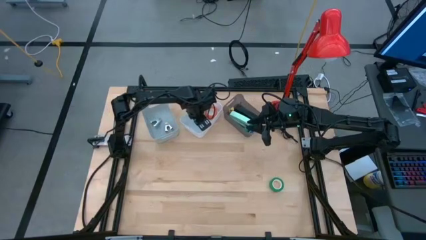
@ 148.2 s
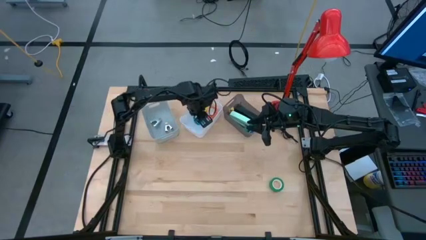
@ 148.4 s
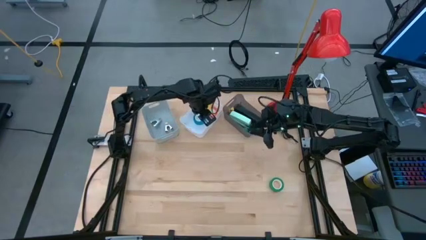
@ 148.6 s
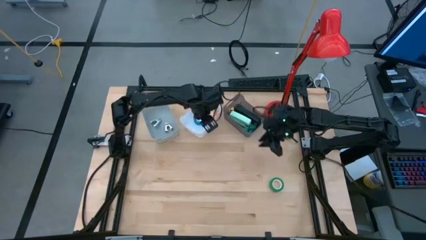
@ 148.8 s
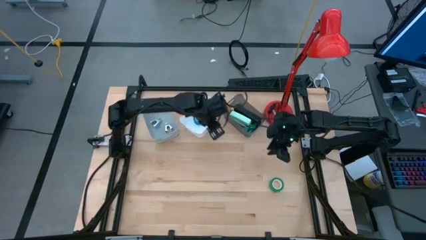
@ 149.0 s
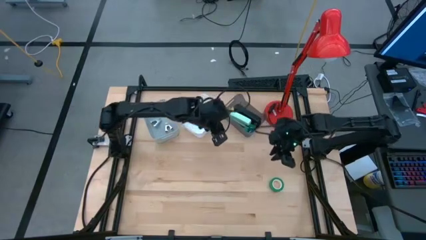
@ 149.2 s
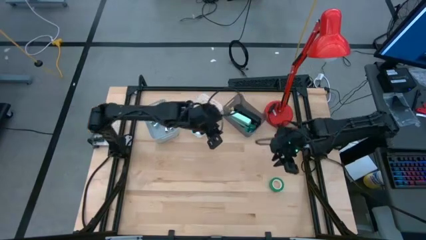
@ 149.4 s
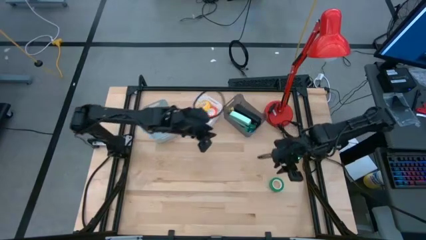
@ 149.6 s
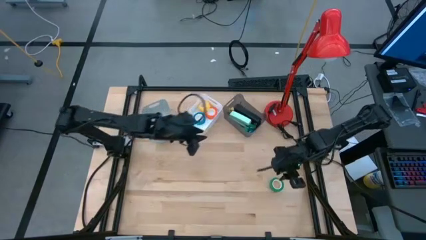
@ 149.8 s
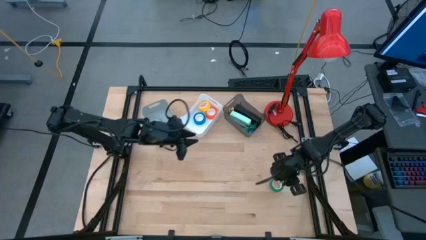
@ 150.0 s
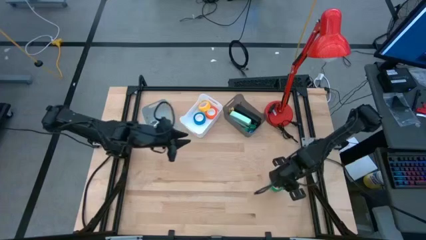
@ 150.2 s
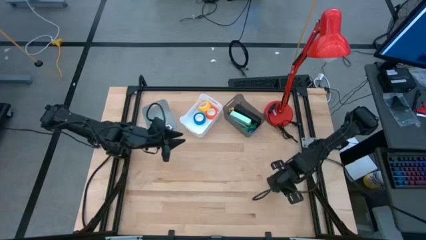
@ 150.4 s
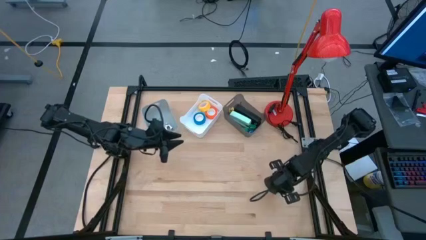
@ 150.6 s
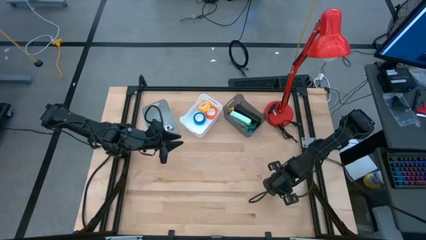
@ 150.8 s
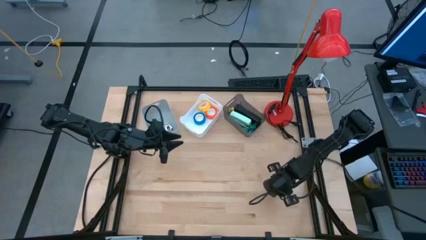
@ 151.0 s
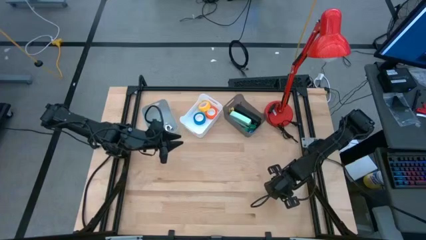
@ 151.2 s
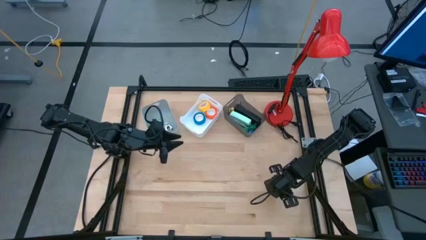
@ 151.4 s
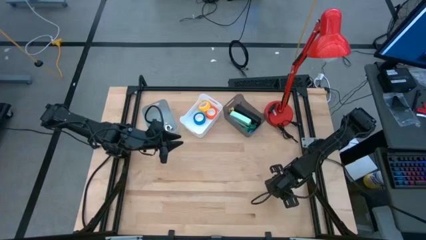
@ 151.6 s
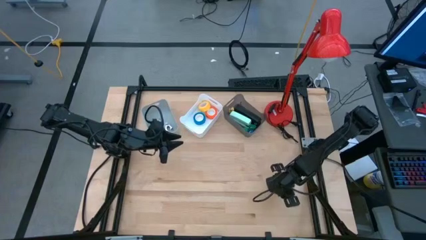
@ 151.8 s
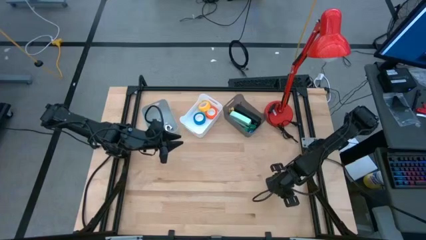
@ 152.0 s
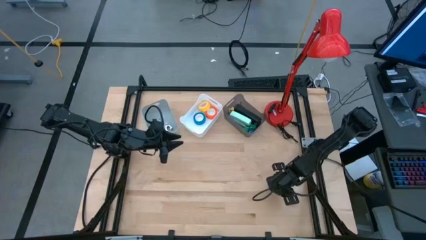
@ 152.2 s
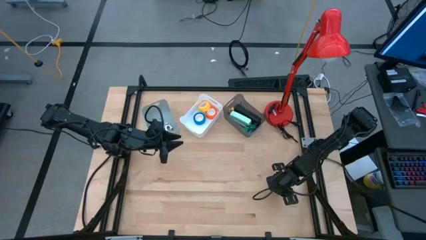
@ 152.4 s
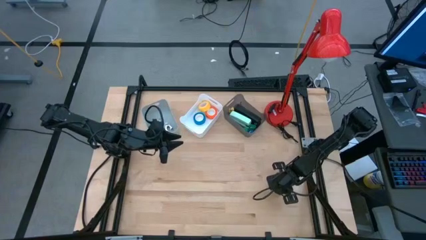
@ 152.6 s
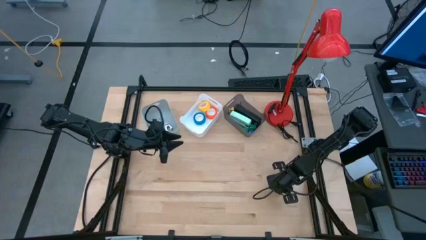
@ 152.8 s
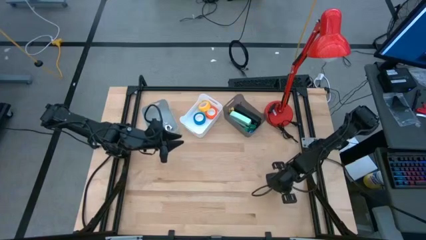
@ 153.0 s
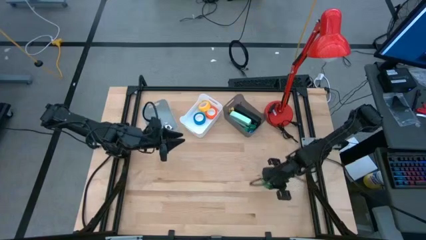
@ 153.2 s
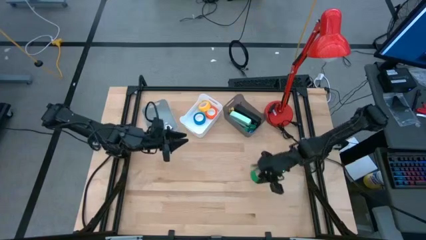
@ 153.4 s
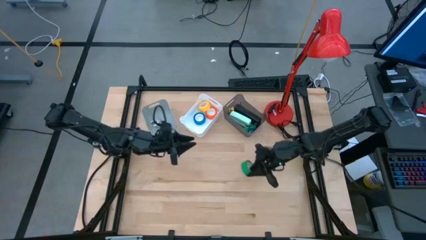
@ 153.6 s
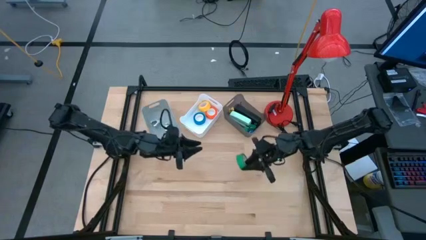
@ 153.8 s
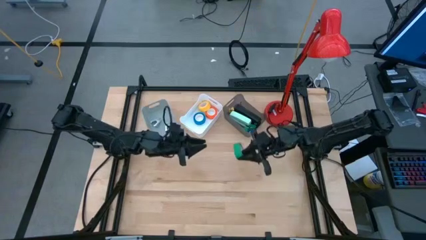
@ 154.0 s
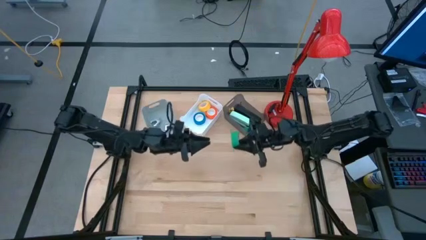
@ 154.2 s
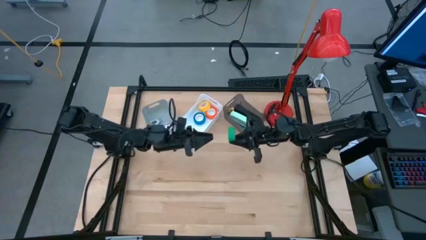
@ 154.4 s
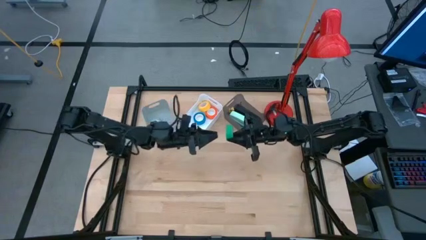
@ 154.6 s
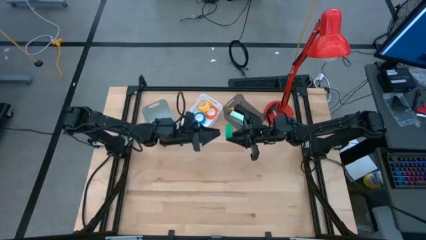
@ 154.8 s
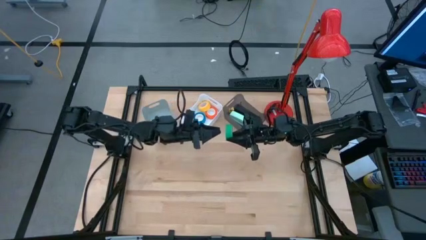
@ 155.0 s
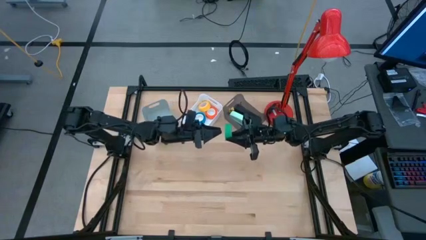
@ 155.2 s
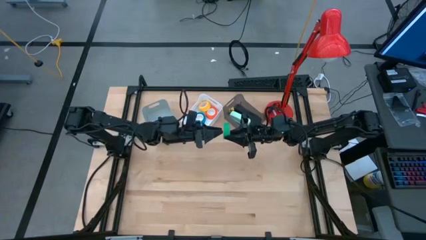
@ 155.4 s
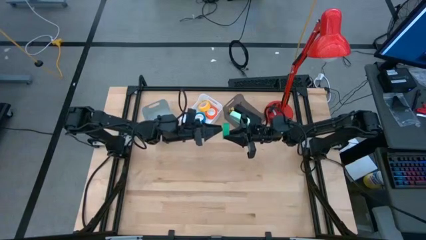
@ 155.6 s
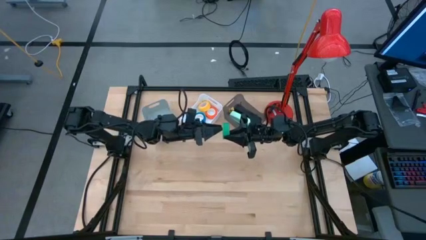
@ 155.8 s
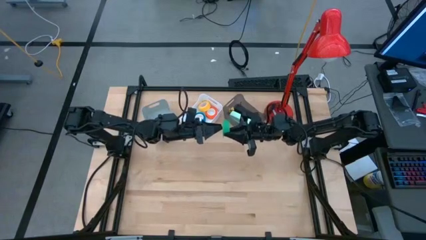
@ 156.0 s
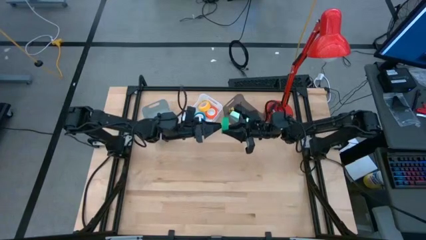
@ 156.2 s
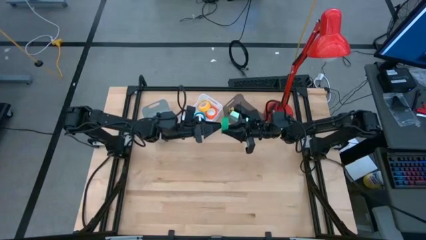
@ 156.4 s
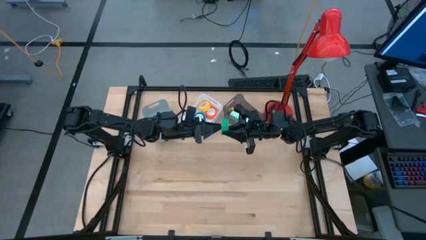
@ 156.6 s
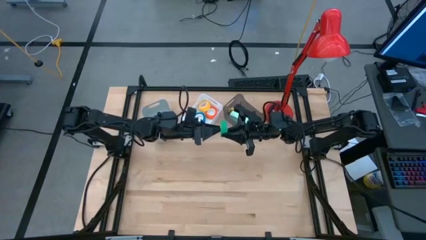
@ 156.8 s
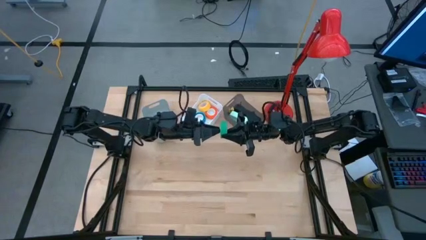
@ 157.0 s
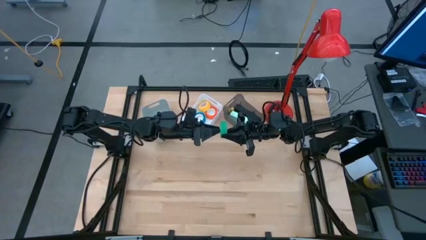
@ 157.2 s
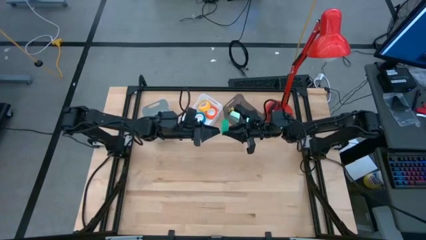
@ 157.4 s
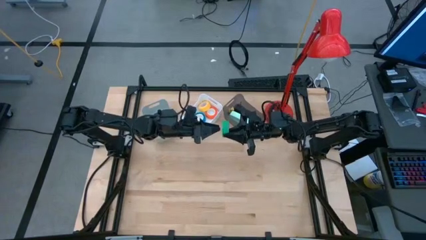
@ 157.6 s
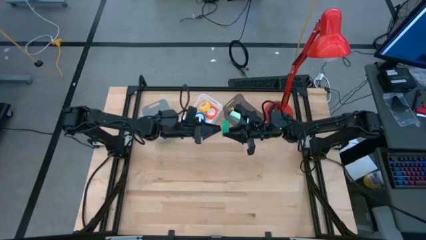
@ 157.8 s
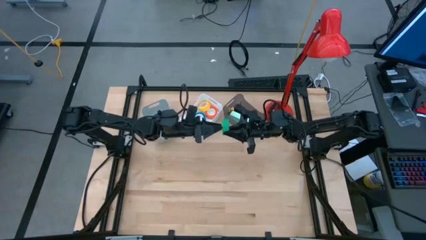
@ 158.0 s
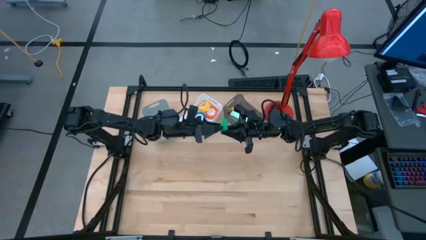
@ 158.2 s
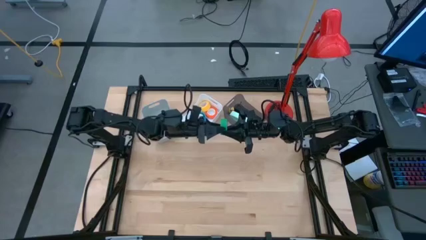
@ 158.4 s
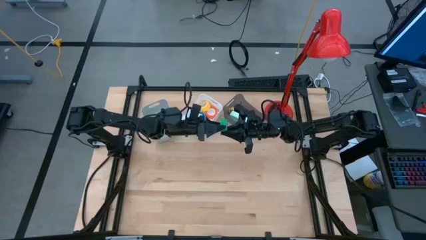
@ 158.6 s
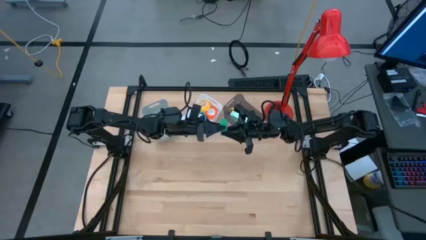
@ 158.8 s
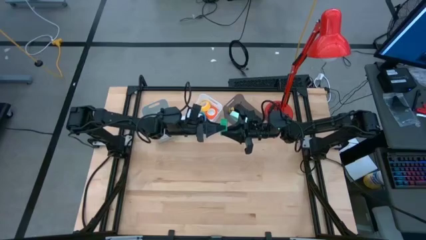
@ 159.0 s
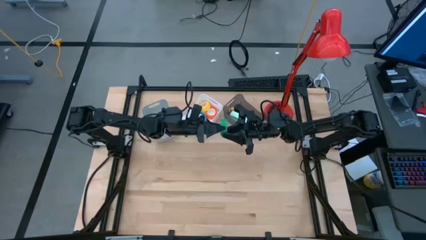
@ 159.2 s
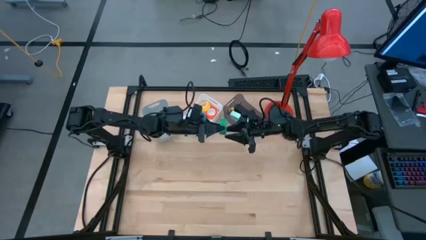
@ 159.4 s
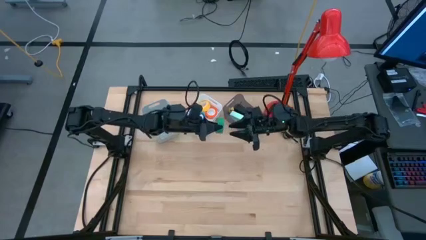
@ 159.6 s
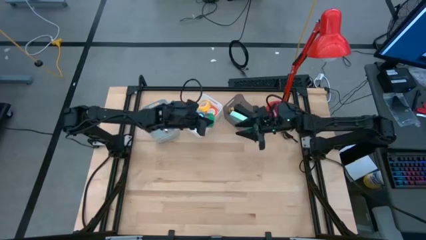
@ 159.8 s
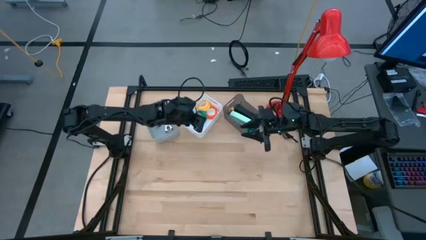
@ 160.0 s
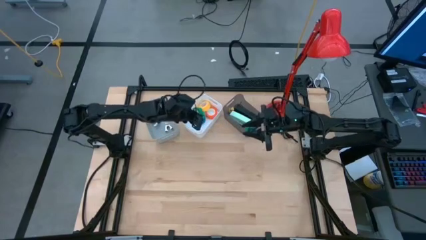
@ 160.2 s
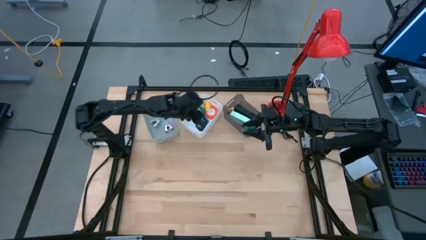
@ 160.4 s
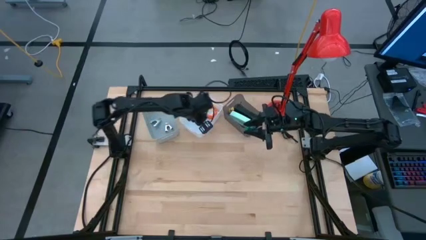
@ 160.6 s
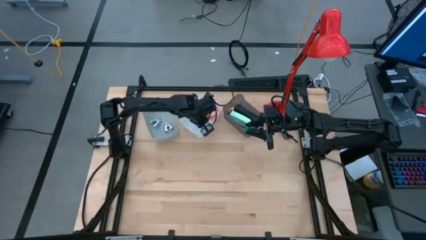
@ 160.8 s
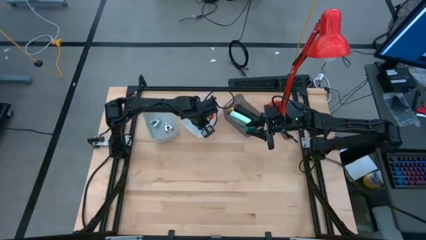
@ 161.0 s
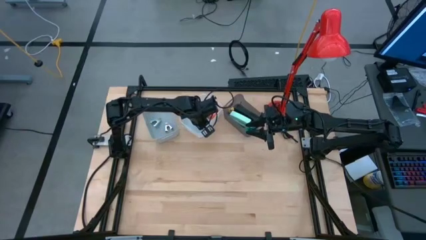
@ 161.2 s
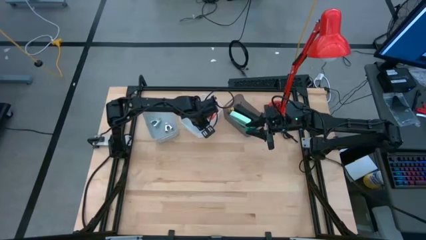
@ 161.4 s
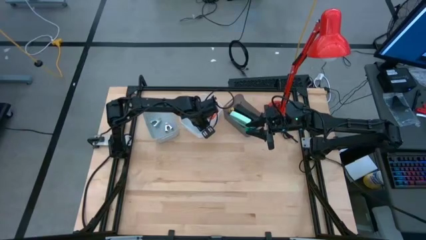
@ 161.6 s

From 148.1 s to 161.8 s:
Task: Pick and place Stapler, Stapler remover, tape
Put the green tape into the white bin
